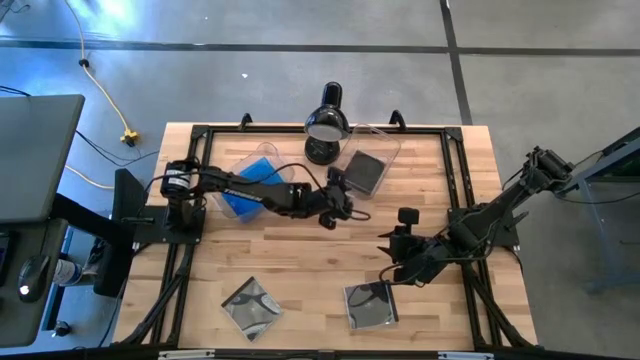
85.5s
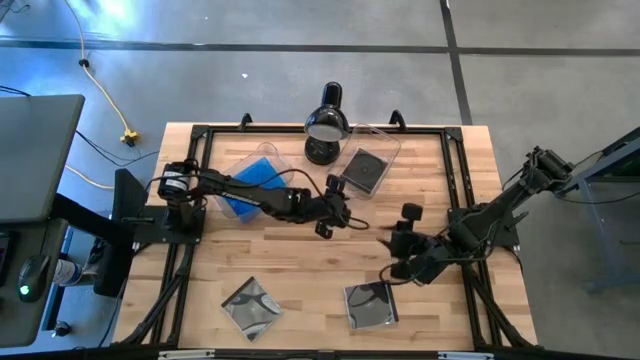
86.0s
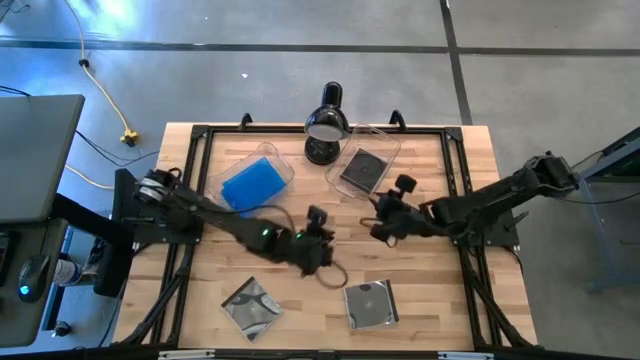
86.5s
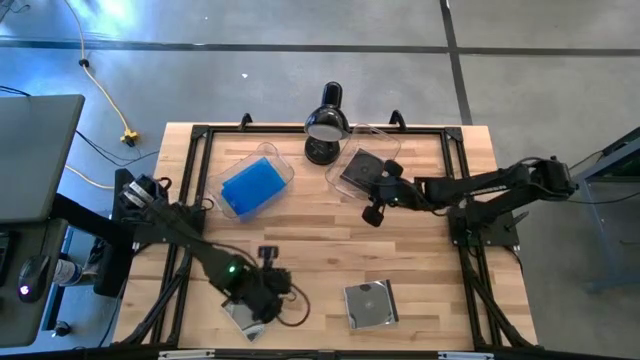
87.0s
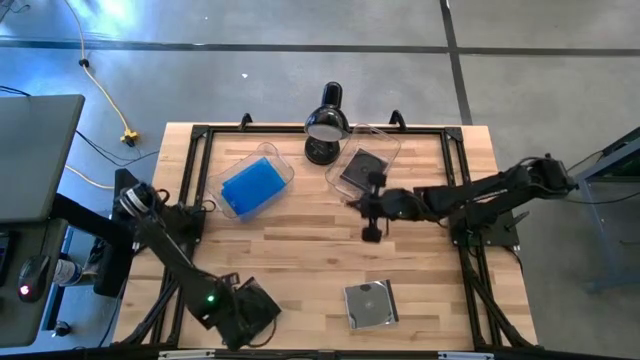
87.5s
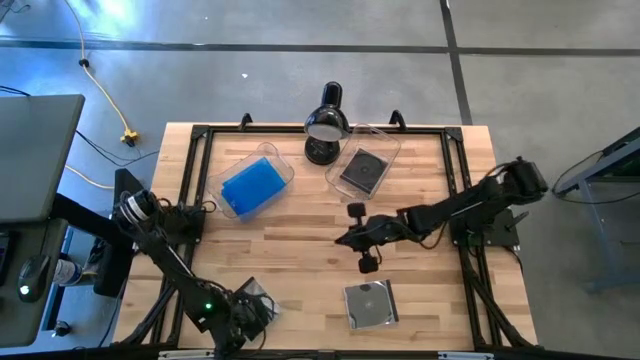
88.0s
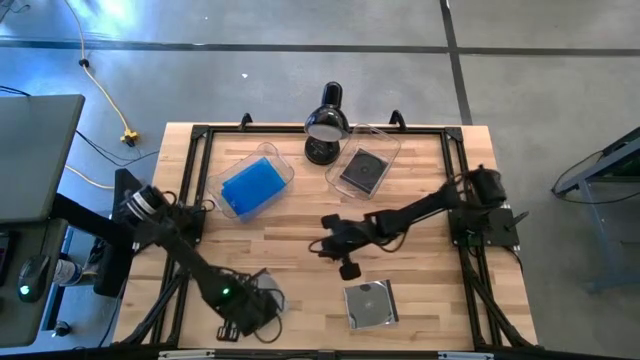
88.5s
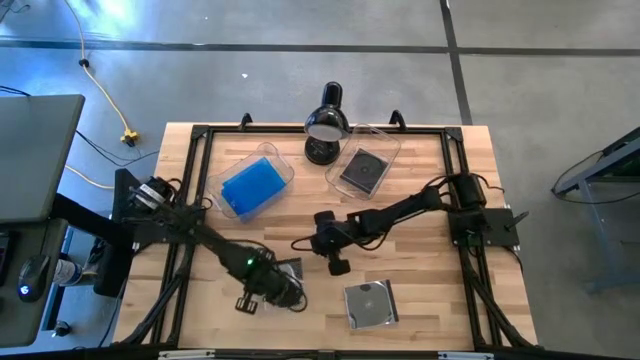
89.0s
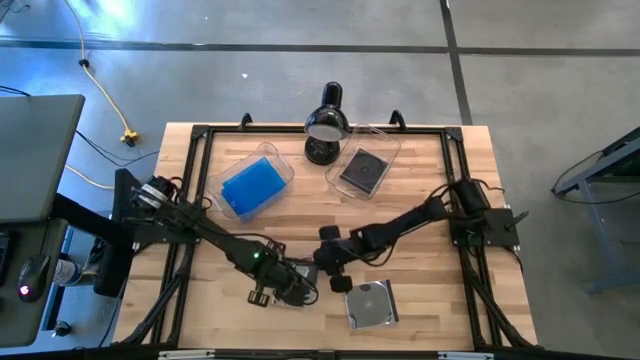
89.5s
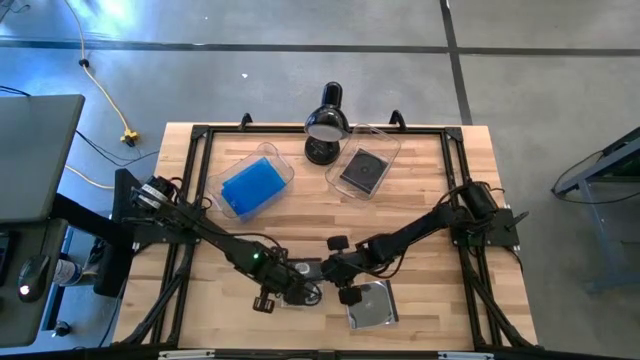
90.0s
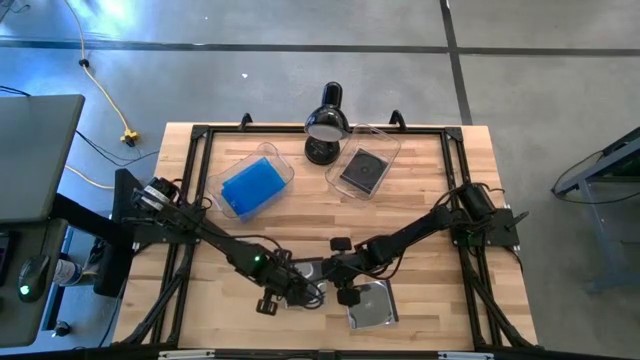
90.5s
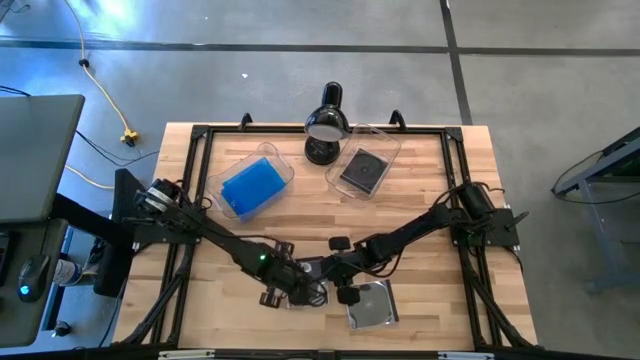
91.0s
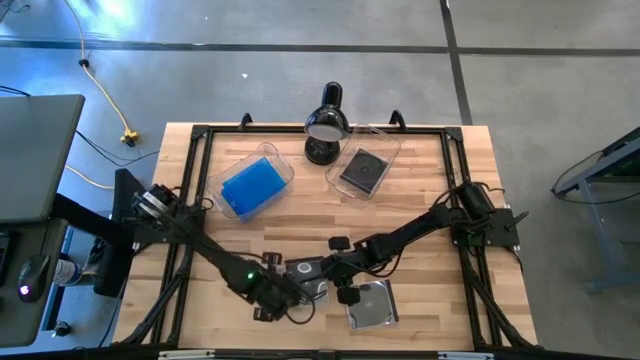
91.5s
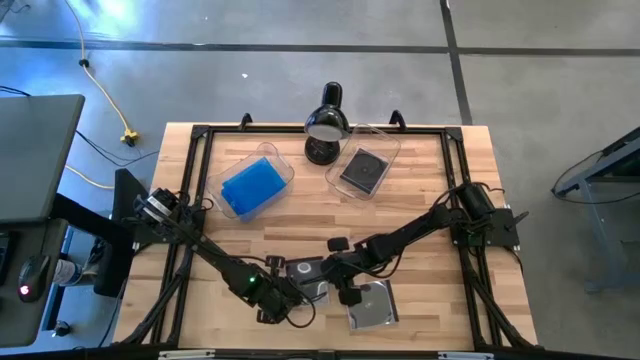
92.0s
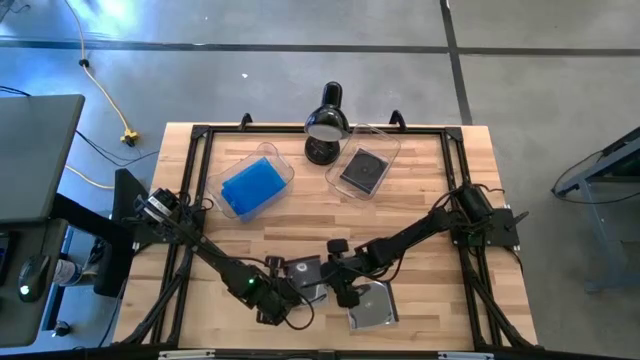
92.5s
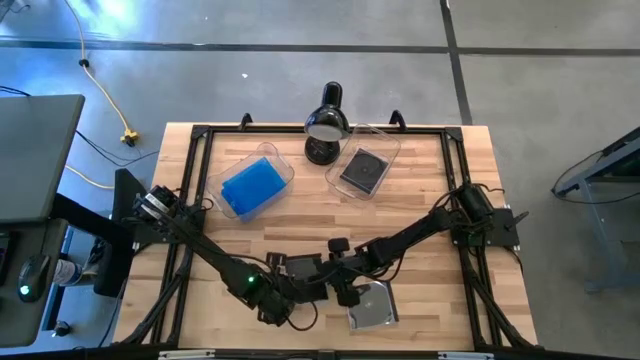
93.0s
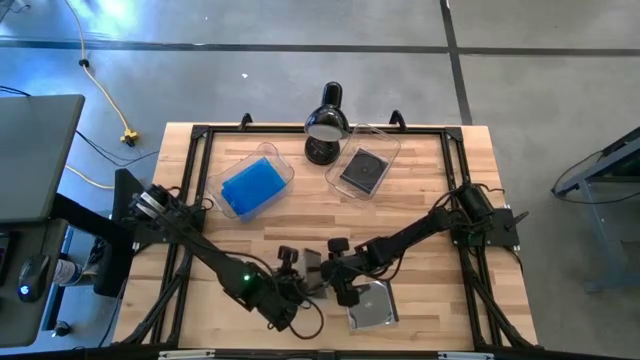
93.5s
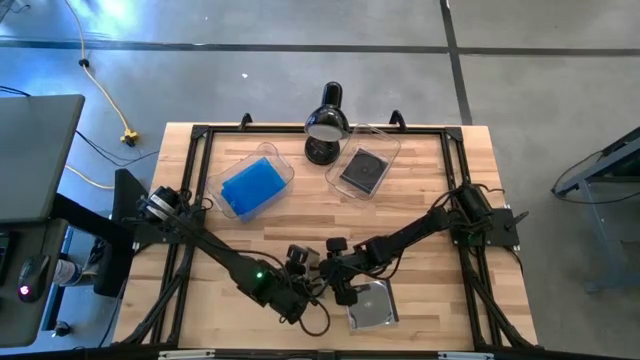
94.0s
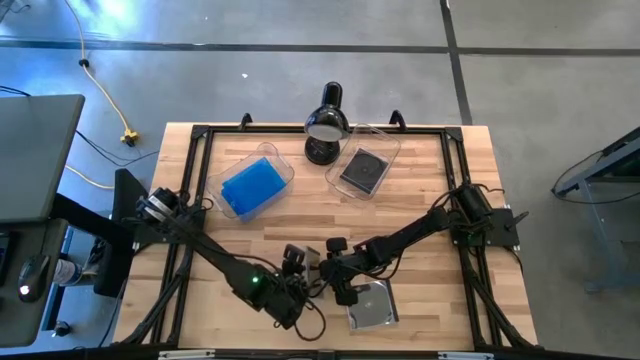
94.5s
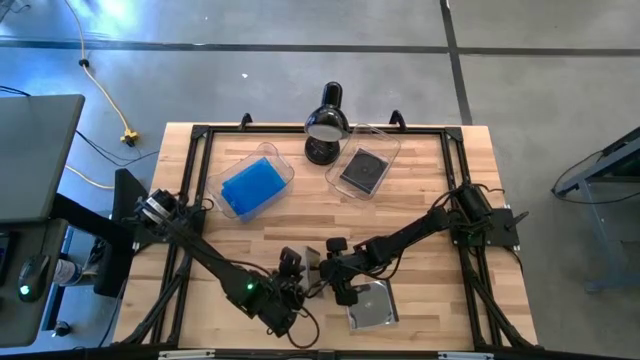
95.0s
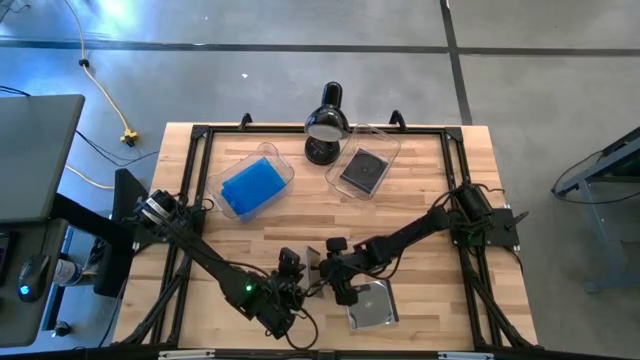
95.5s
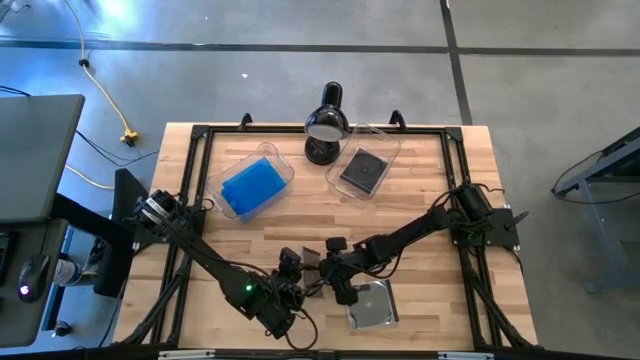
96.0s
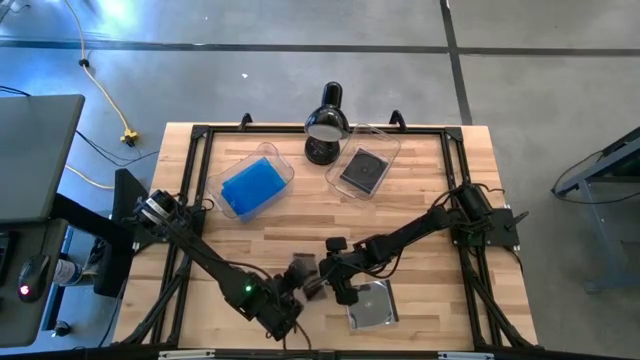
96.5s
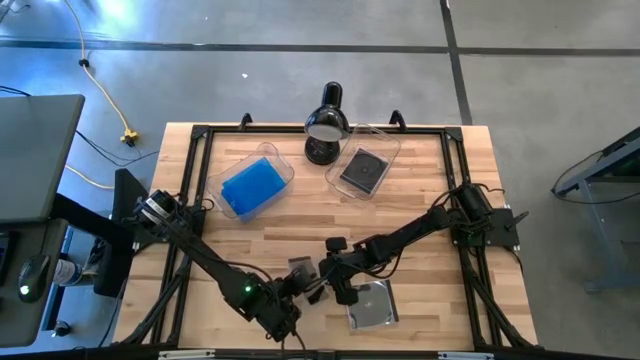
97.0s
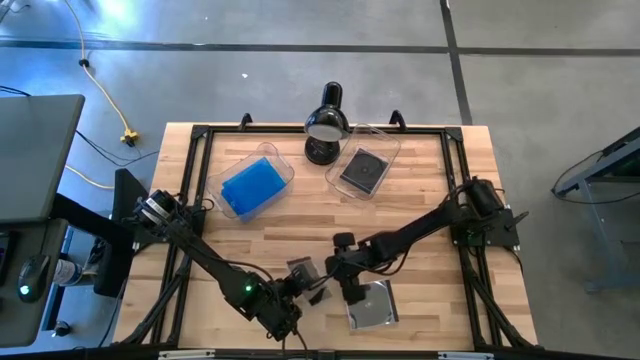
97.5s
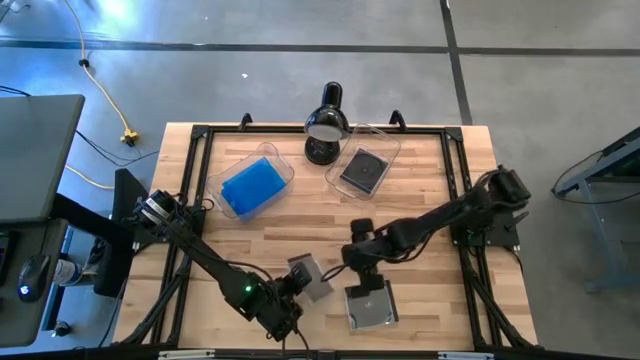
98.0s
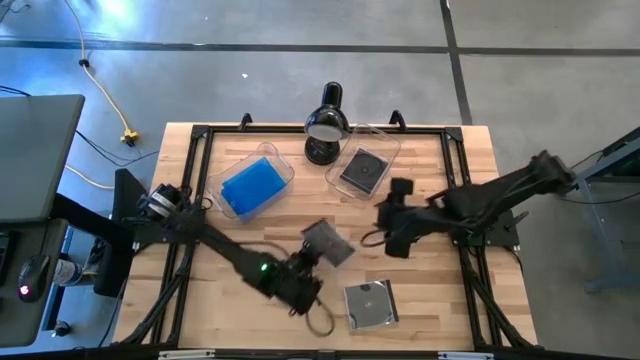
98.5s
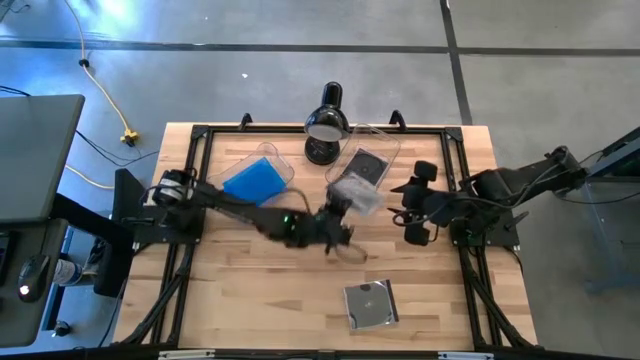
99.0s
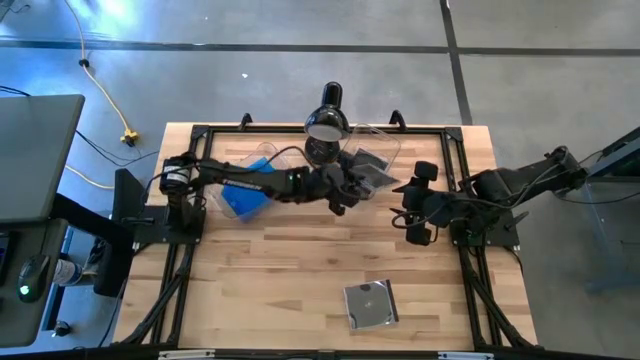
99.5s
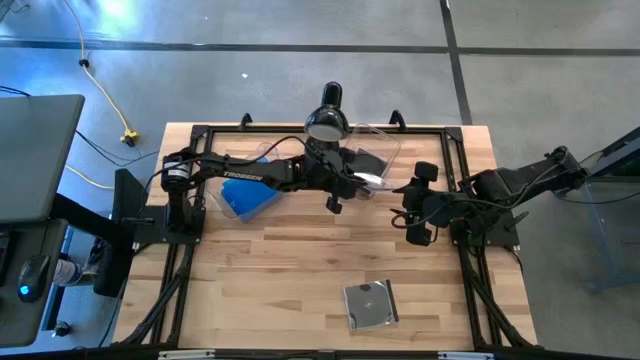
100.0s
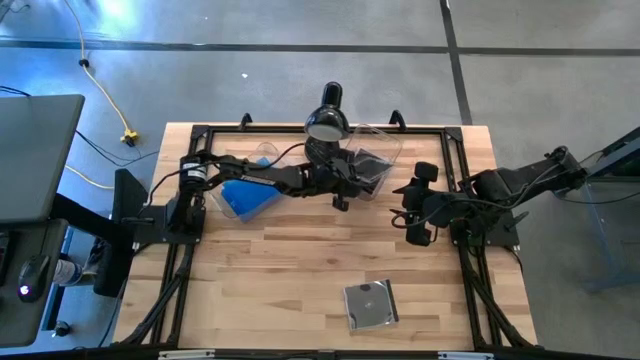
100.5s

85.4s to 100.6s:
Task: Pick & place jewel cases by type
Put the left black CD case into the right transparent bin

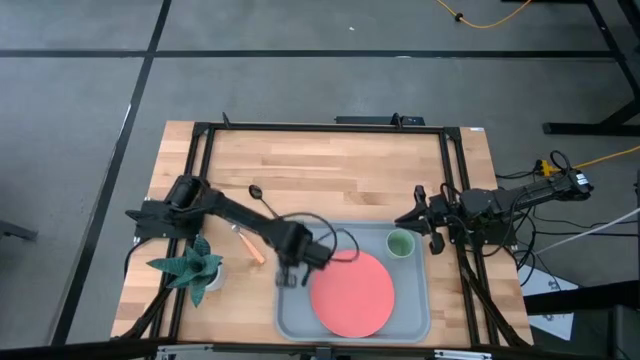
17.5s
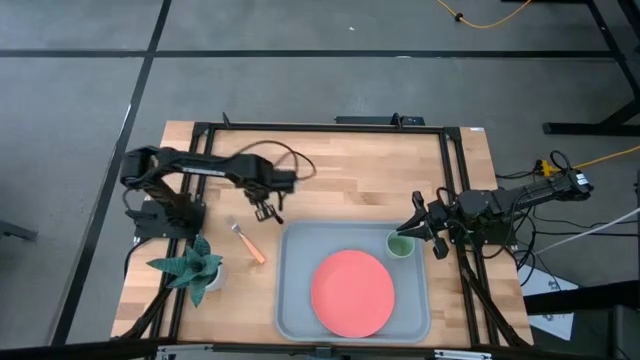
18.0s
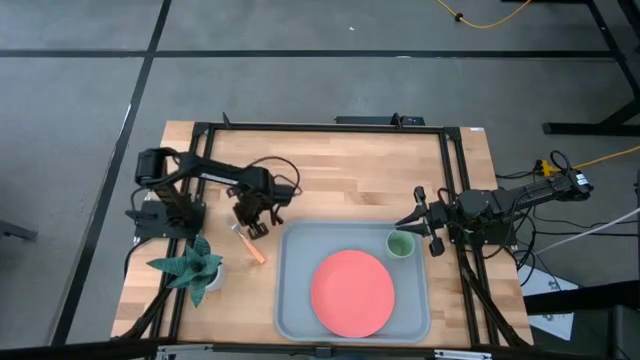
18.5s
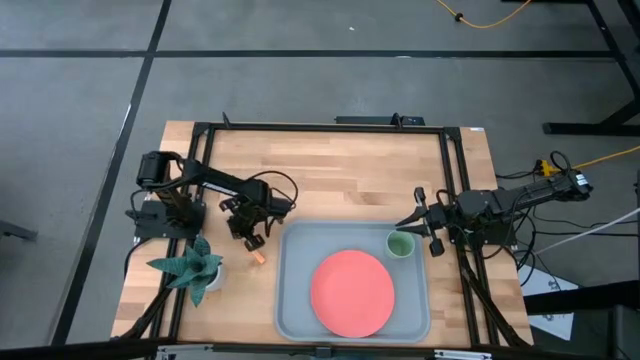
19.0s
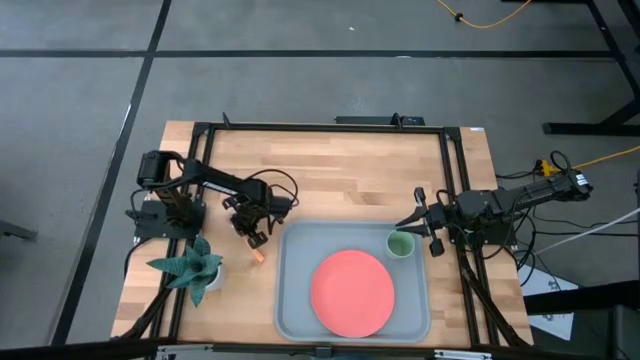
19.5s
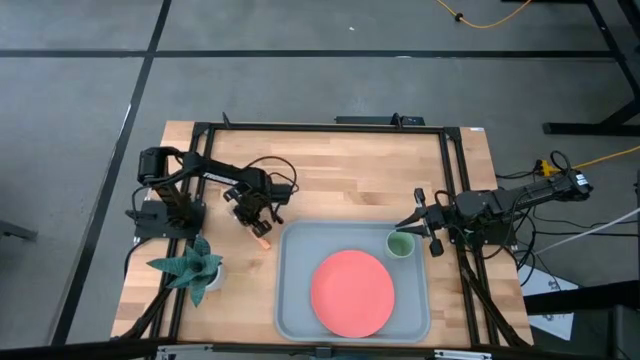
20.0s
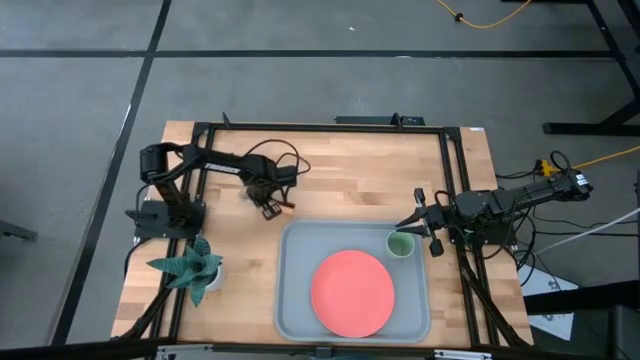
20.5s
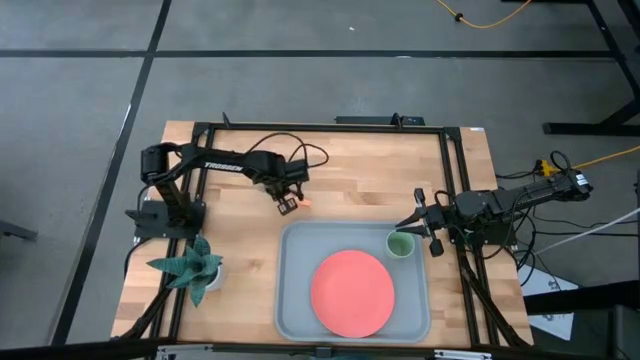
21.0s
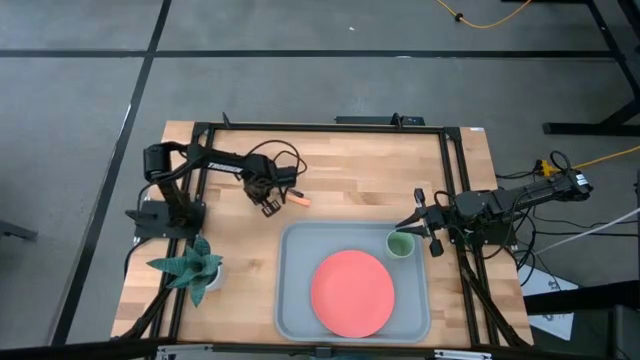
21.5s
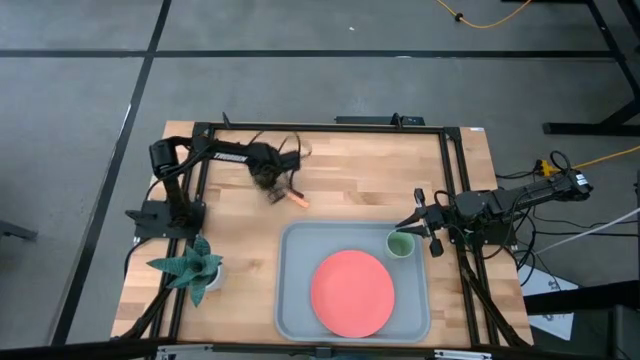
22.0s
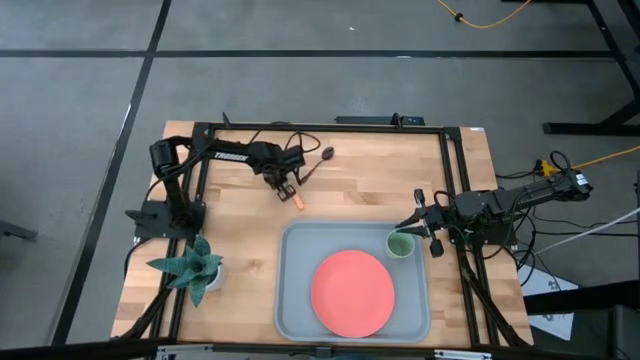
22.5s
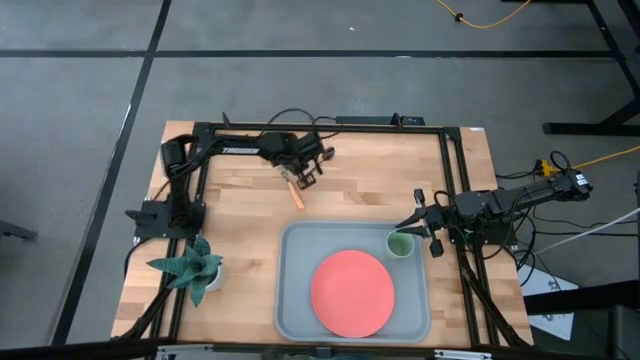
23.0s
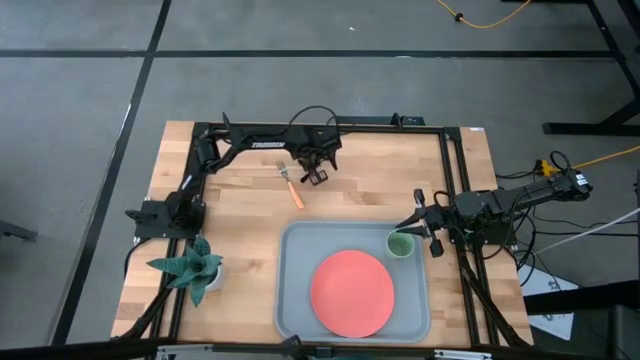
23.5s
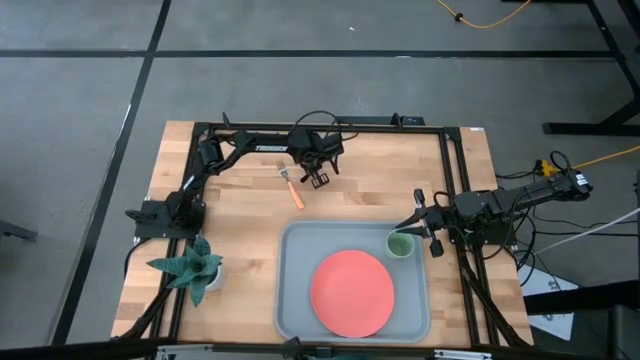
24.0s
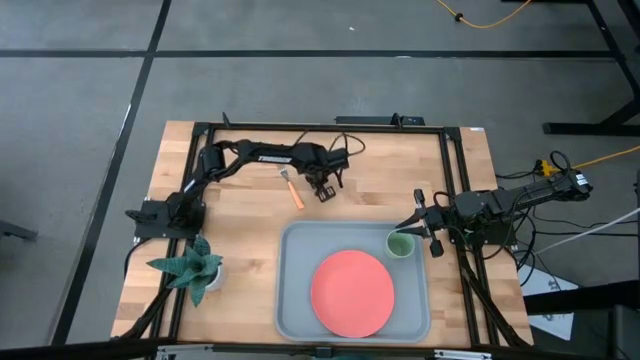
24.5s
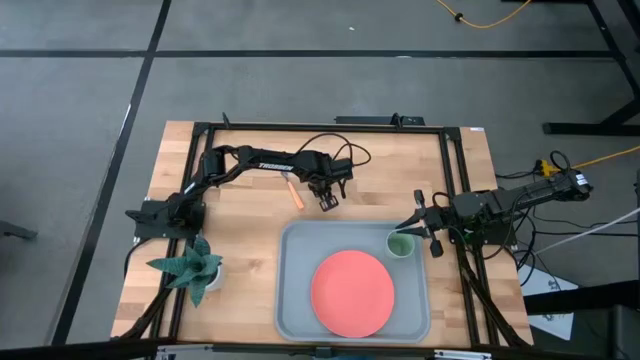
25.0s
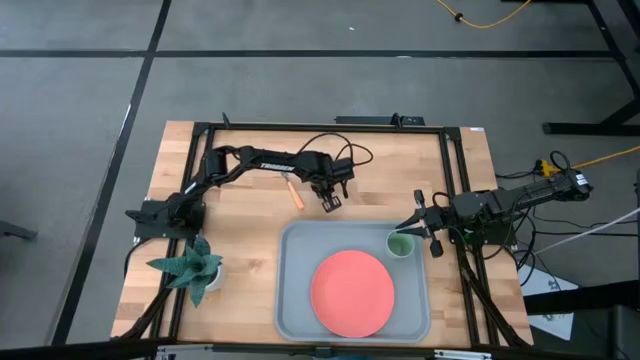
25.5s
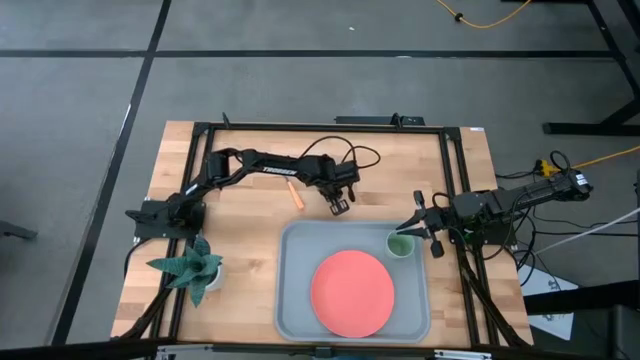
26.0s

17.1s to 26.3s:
Task: Pick and place plate/cup/fork/spoon on tray
Move the silverware to the top of the table
